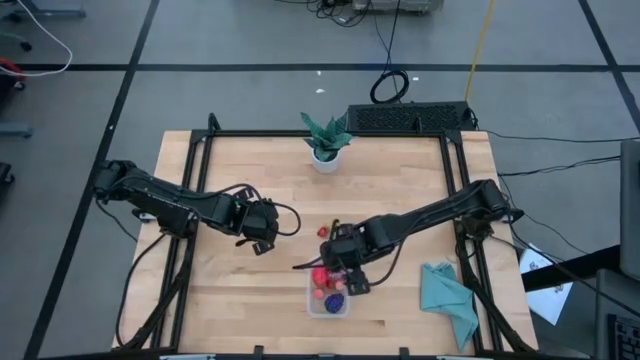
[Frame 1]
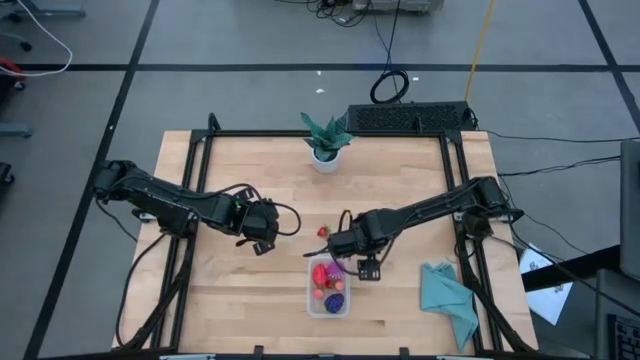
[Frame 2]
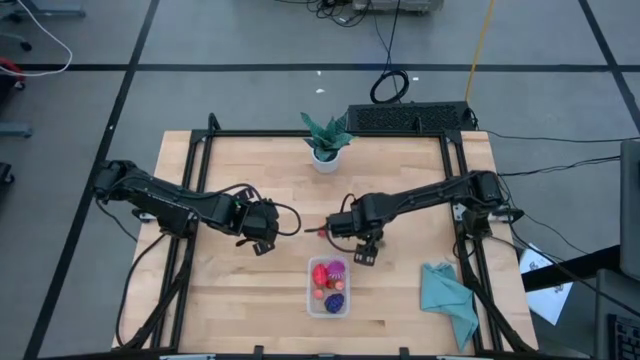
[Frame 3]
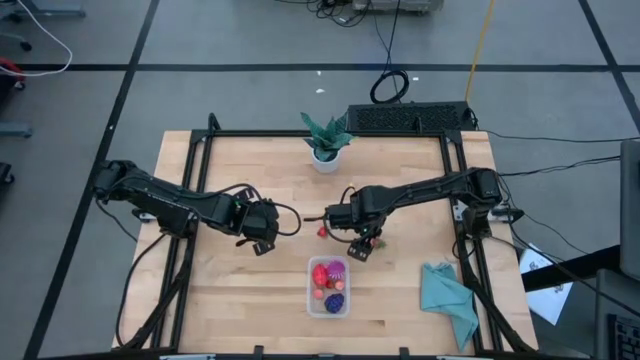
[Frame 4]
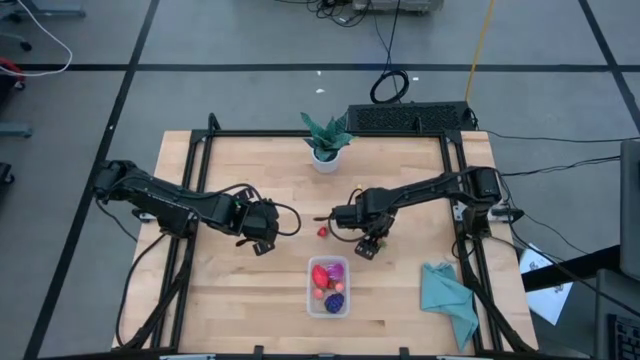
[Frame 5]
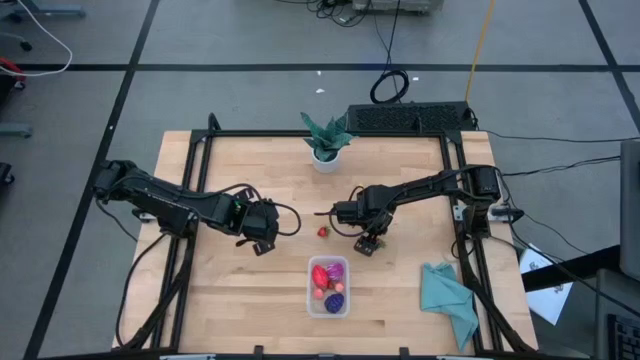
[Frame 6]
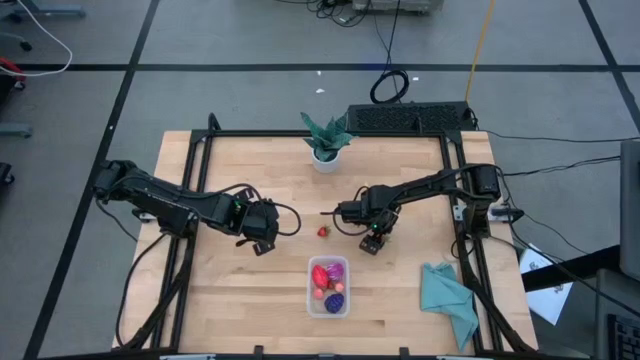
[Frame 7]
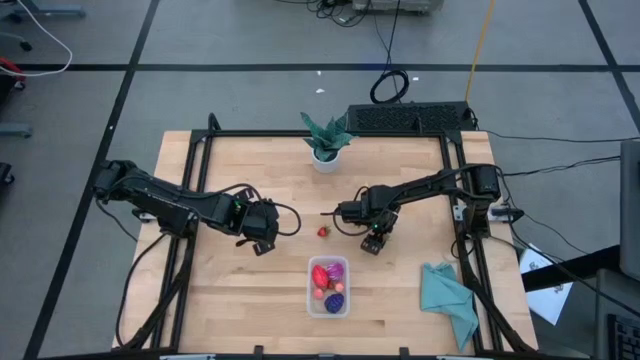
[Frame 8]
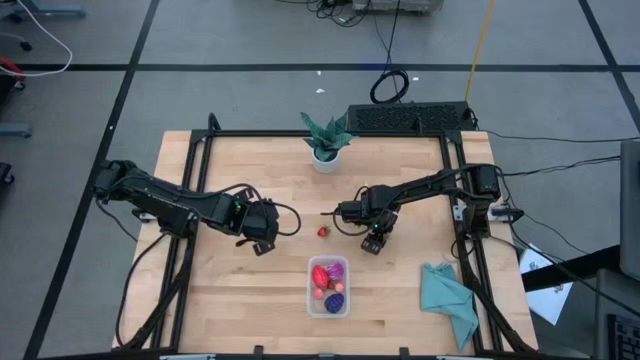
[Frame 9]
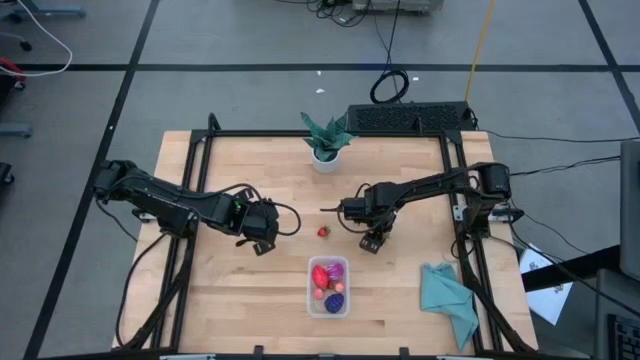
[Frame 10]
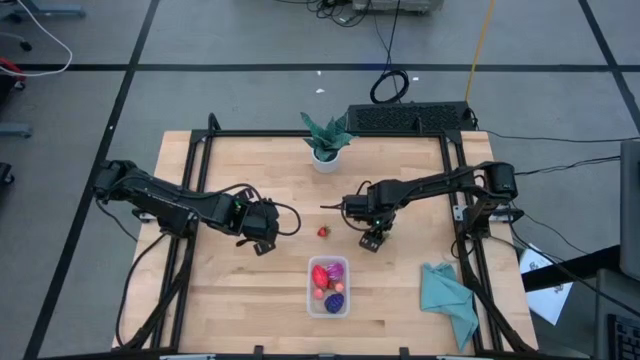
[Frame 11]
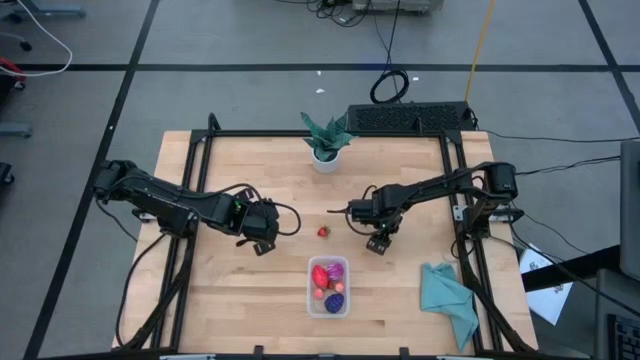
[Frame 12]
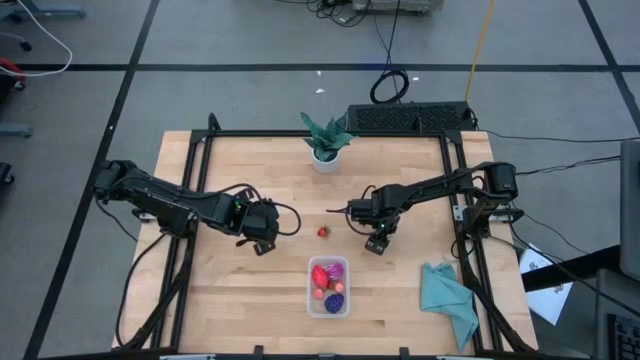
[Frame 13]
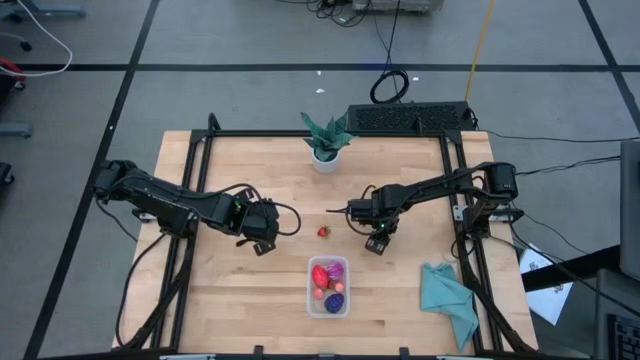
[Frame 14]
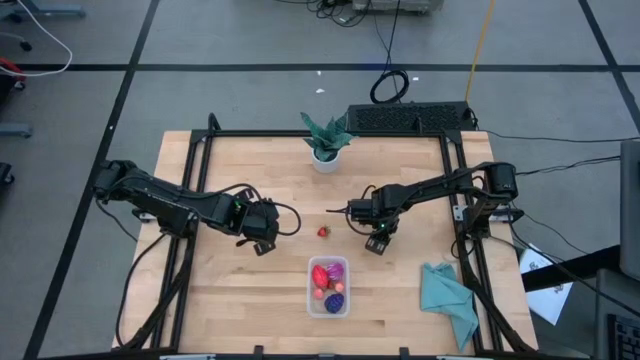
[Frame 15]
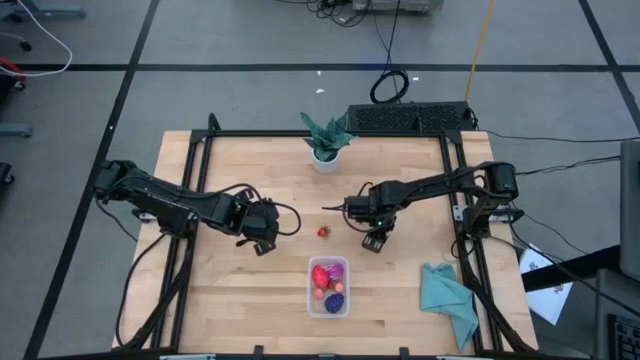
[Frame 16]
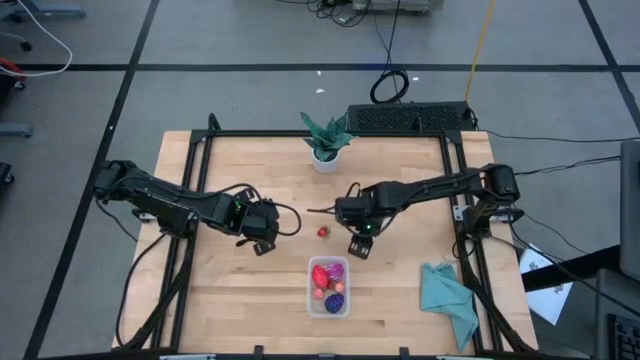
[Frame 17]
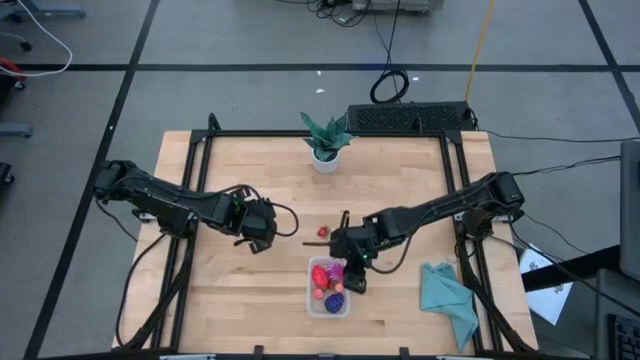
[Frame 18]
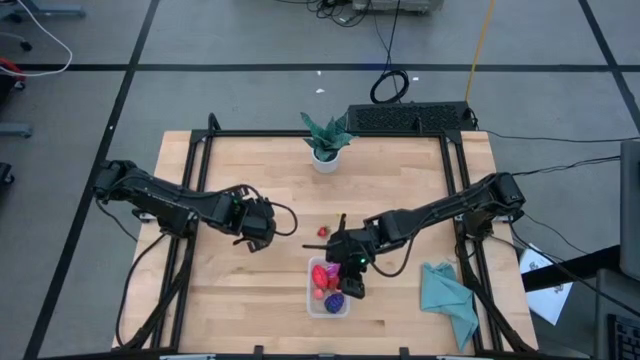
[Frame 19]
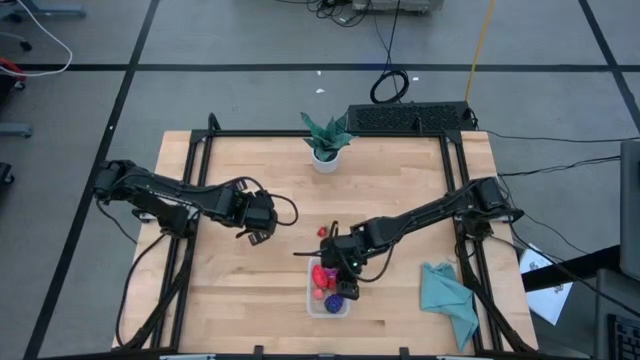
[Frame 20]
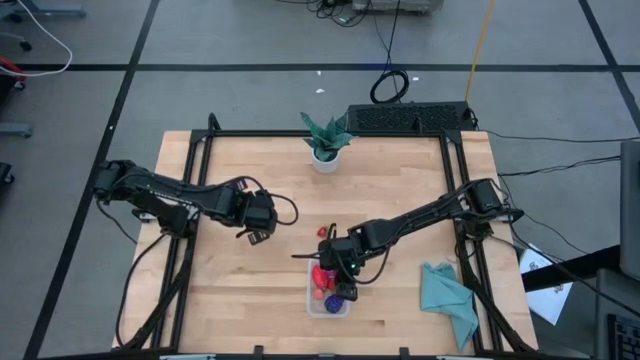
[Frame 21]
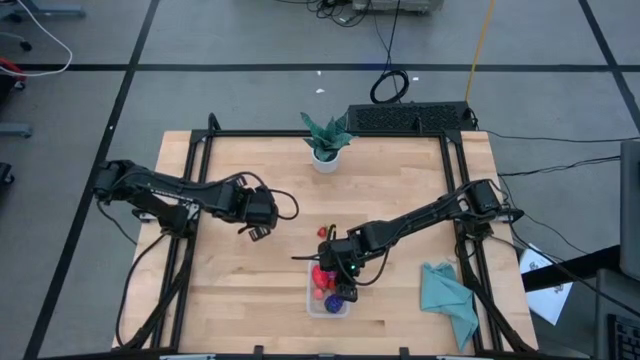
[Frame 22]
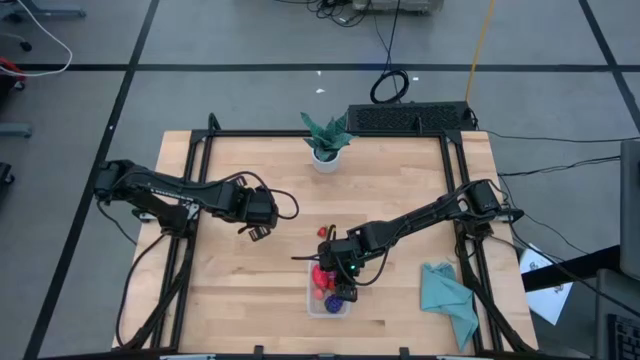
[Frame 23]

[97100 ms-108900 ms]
Task: Pick and placing Produce into tupperware
Put the right red strawberry into the transparent container

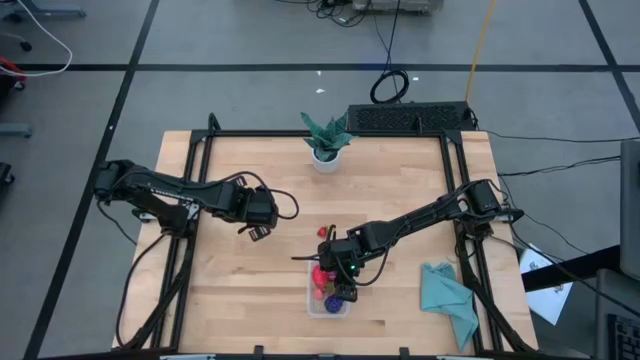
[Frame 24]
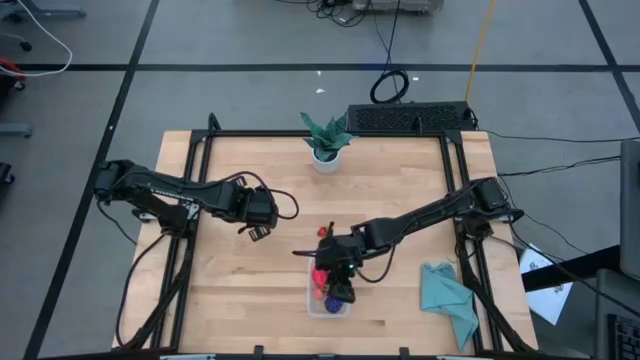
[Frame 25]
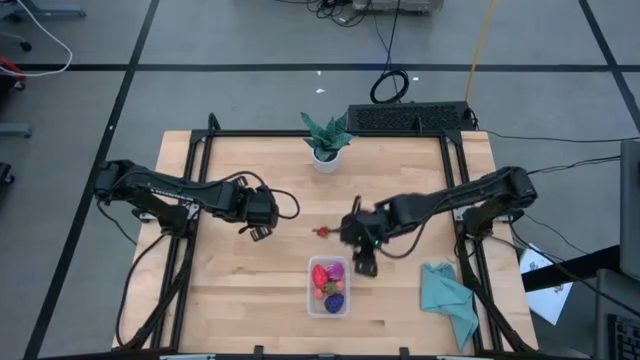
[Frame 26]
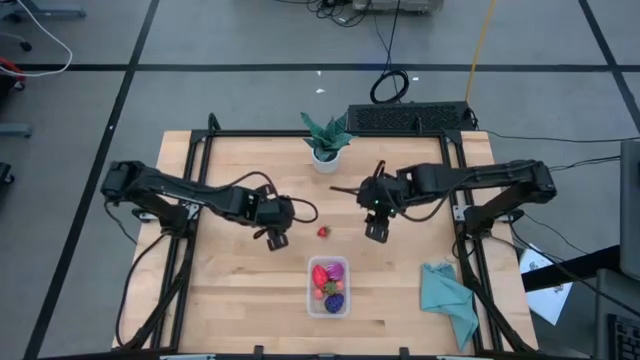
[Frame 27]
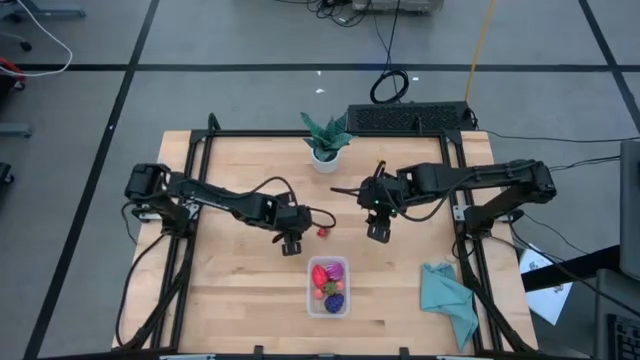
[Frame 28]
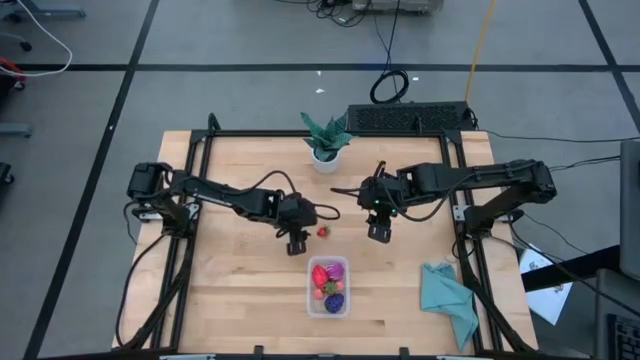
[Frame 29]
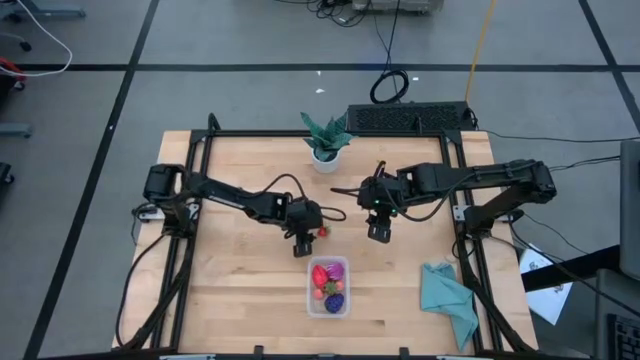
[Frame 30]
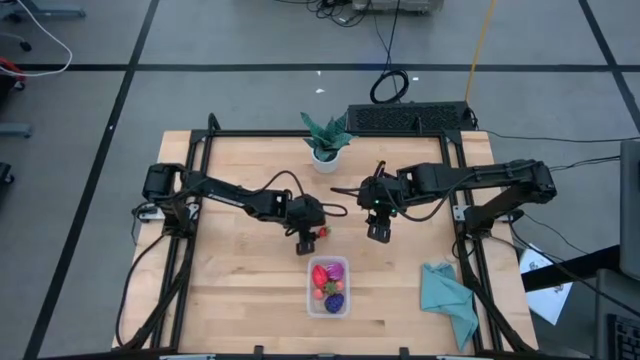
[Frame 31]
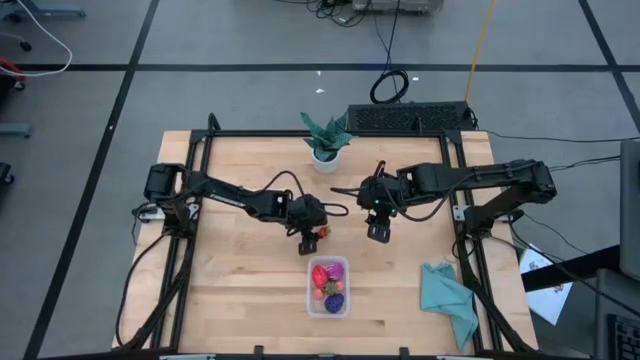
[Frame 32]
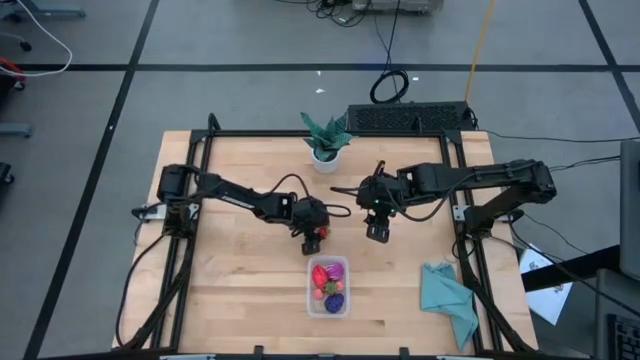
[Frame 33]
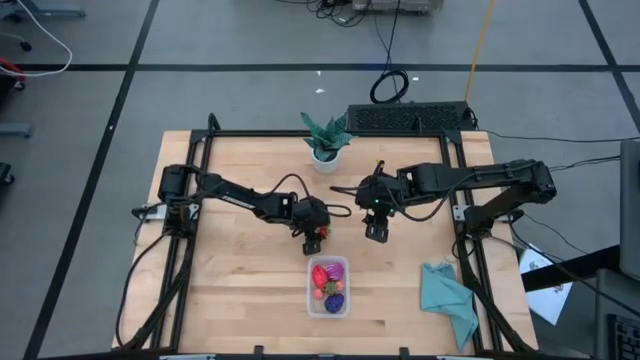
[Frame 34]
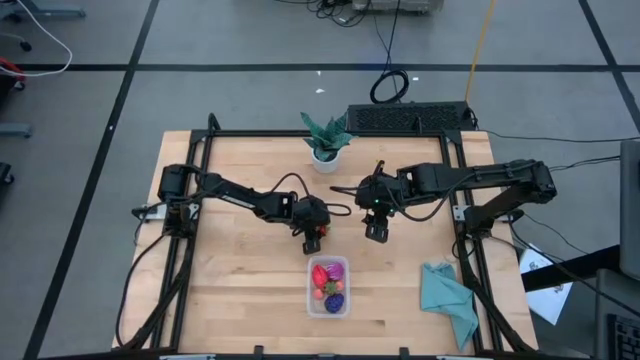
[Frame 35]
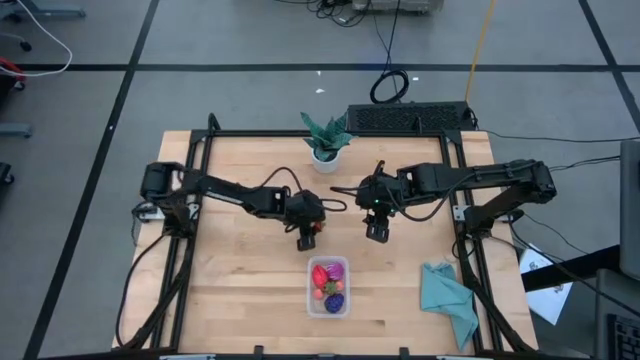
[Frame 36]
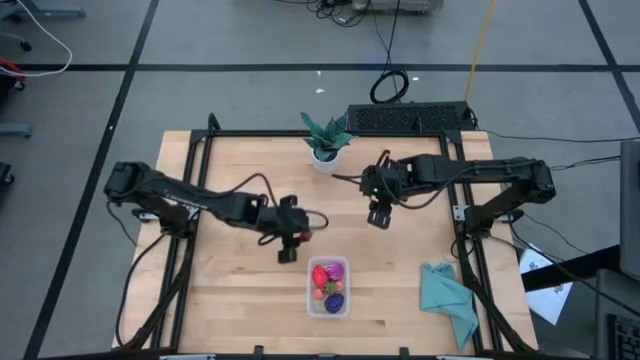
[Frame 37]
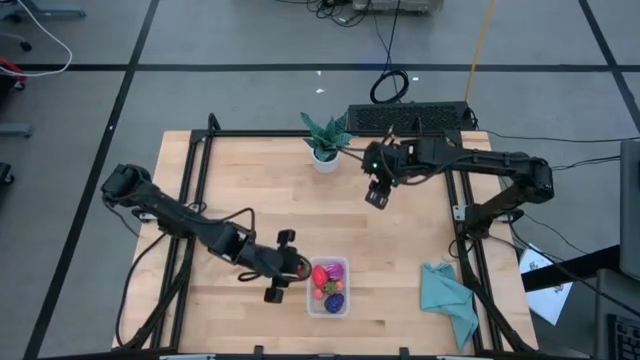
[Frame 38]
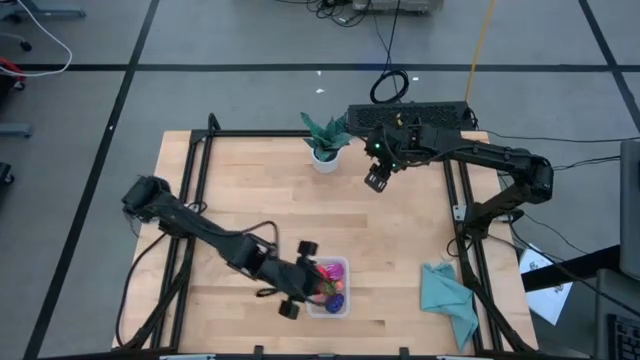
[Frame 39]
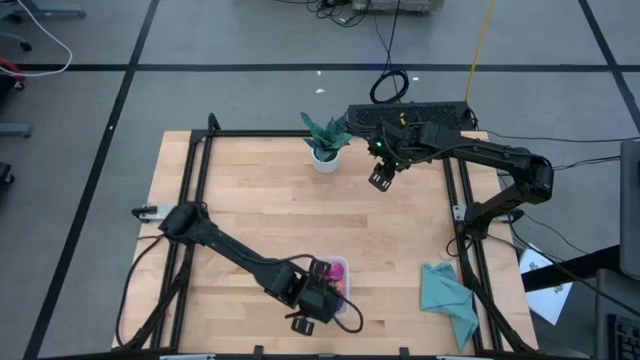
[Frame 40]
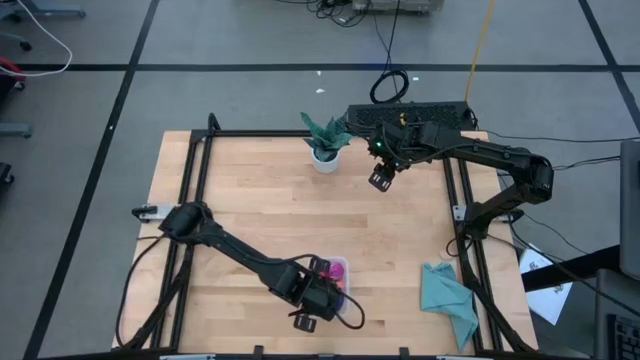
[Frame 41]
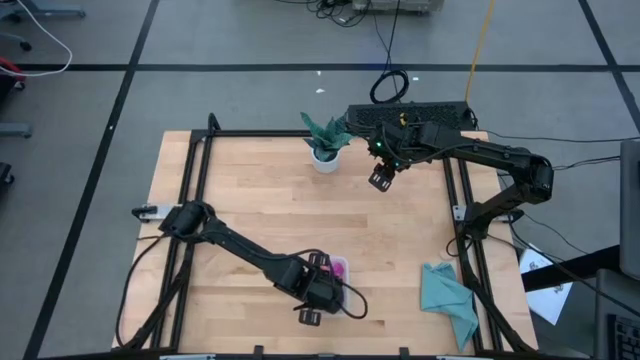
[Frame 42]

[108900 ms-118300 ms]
Put the red strawberry into the transparent container

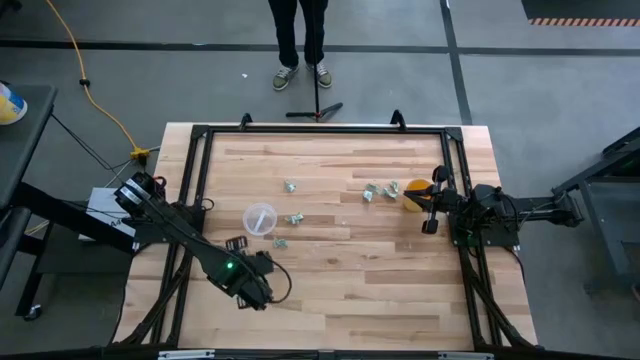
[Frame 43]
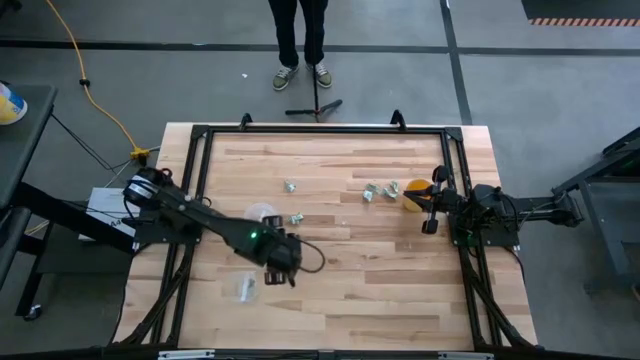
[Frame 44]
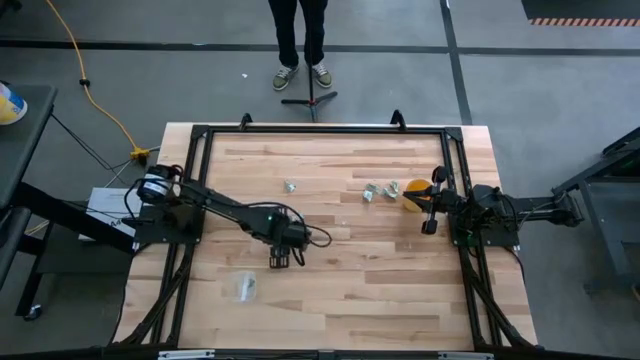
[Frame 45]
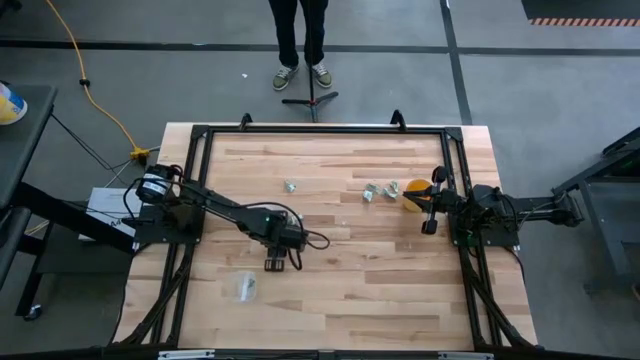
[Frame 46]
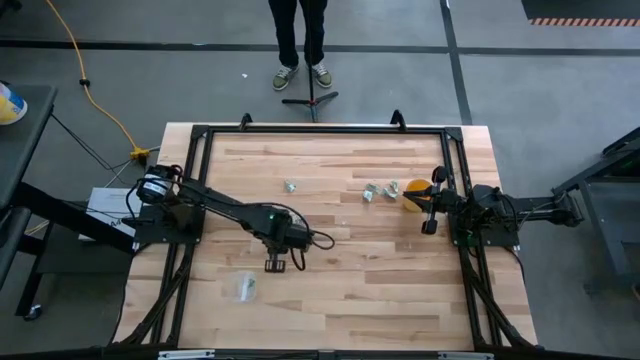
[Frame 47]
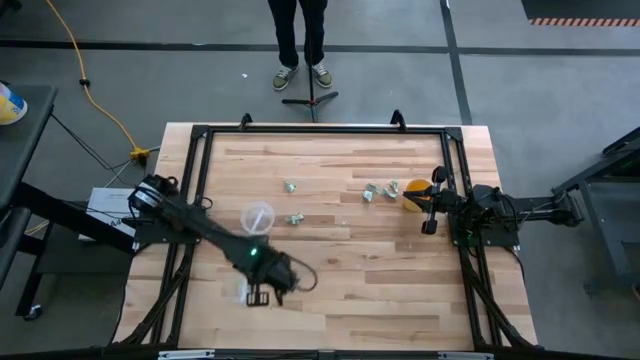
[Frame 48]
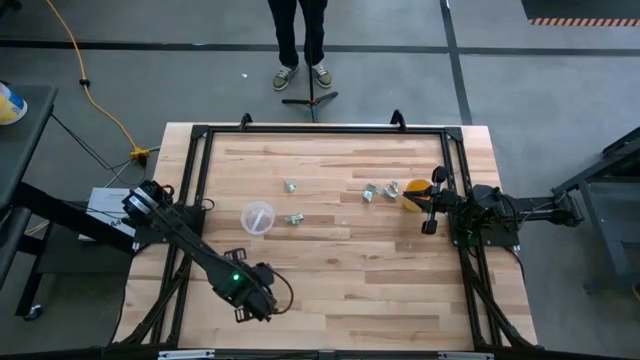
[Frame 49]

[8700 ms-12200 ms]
Task: Pick and place Stevia / Truvia into bins
Put the stevia packet in the bottom transparent container
